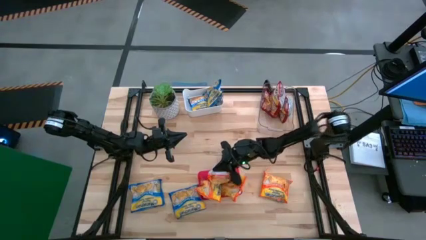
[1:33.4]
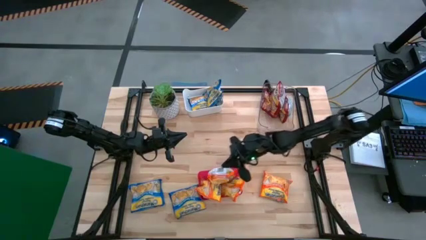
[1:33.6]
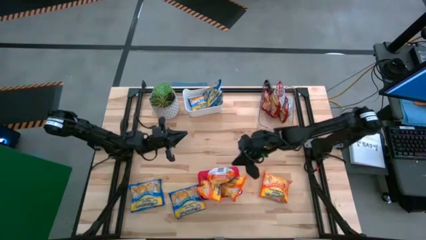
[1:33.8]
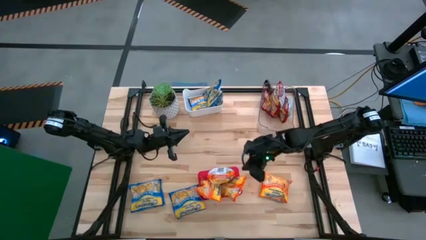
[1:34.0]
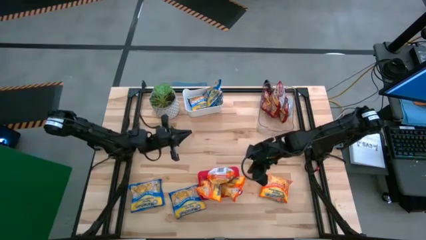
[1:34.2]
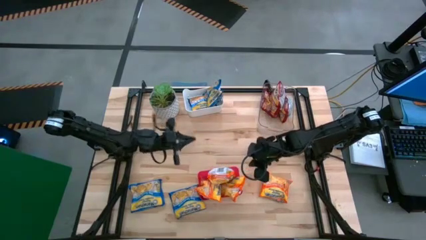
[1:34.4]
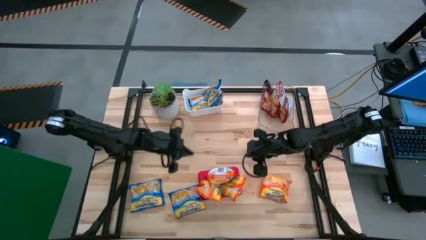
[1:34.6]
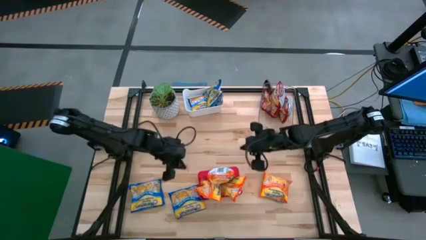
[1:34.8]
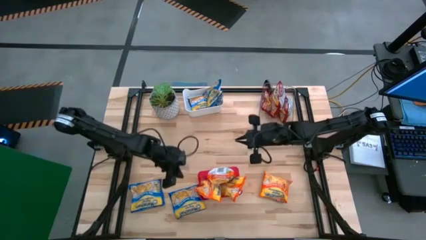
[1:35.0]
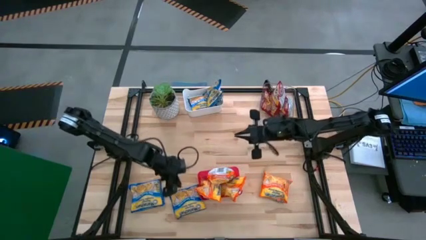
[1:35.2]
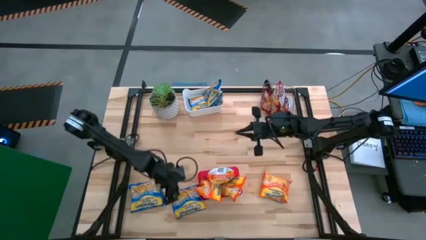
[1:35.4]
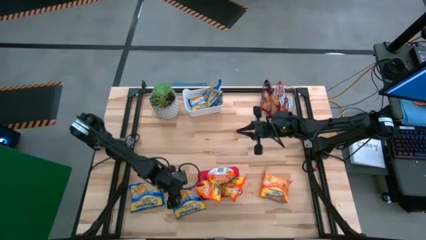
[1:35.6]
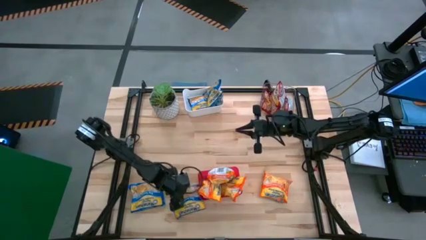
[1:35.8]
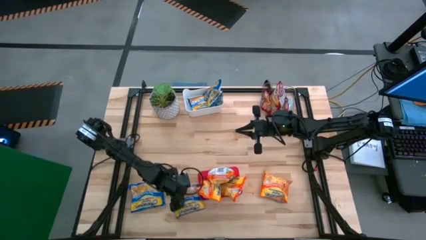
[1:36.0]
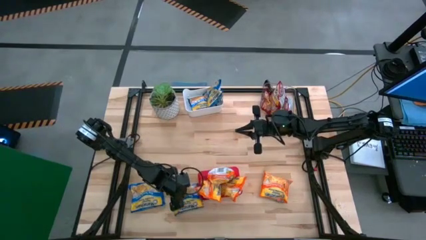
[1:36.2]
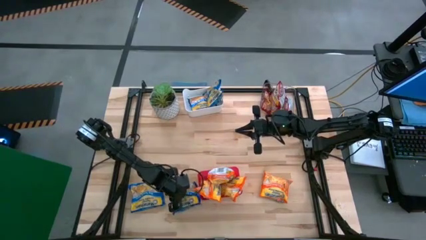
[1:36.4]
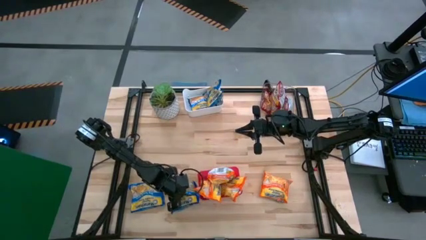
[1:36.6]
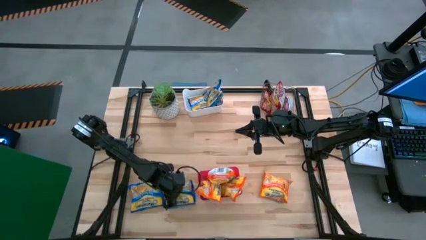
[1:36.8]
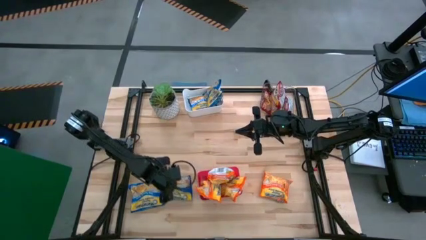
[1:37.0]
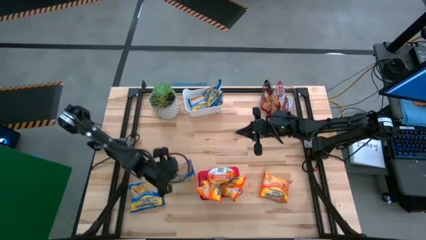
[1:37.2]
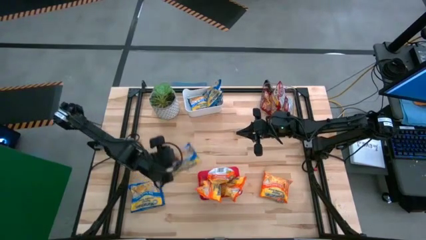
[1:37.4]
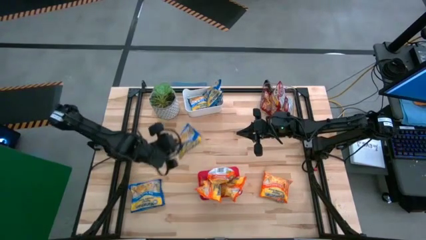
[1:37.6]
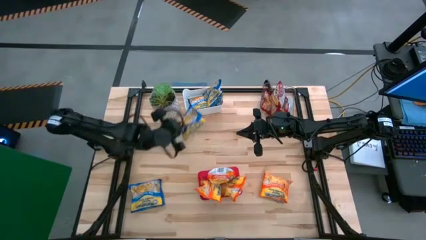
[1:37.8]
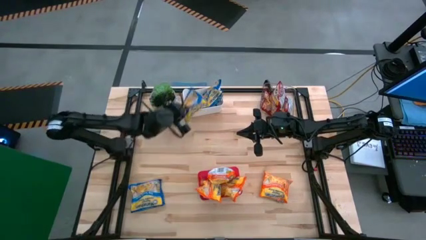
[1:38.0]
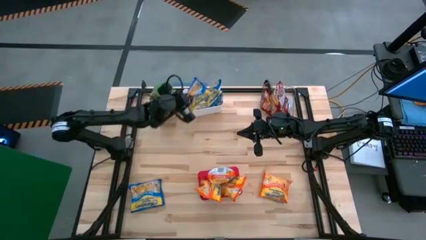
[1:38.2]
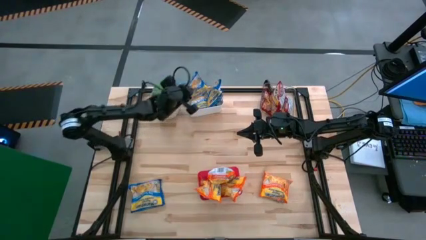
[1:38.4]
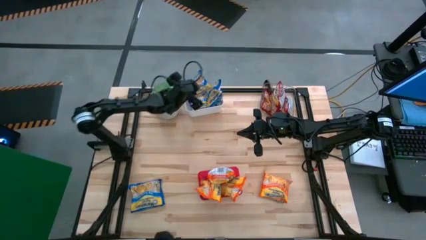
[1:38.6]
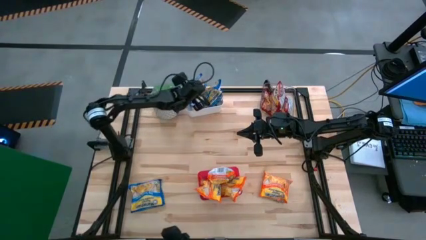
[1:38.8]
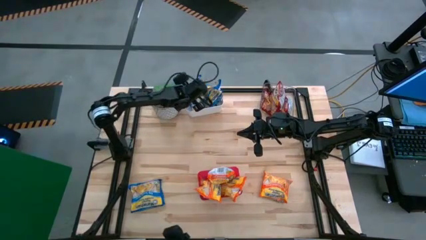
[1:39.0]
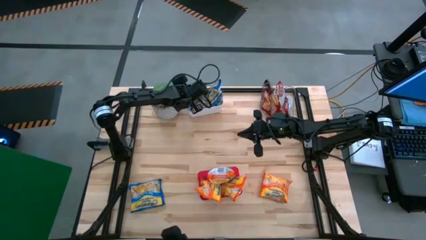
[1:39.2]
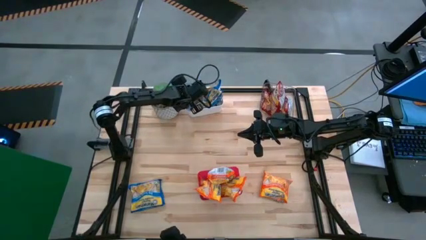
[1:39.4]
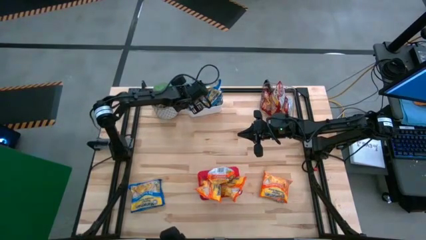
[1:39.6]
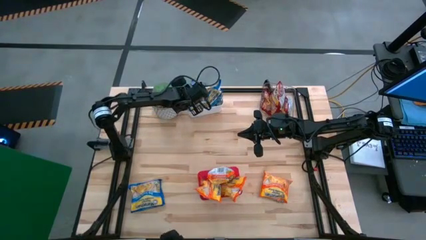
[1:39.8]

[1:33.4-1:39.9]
Task: Sort Maruchan noodles
Put the blue noodle pack into the white bin

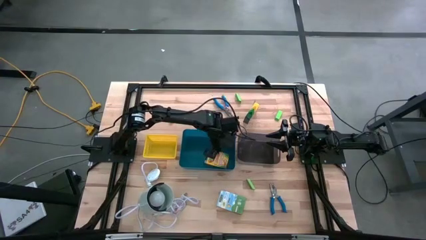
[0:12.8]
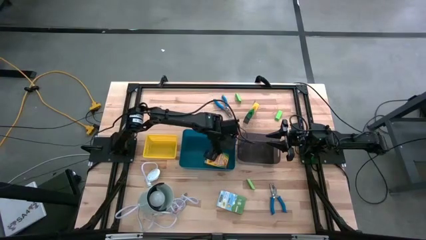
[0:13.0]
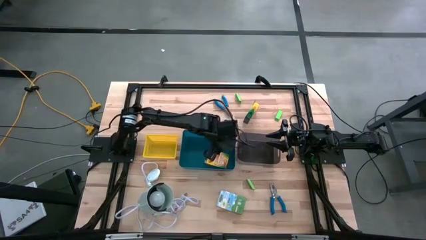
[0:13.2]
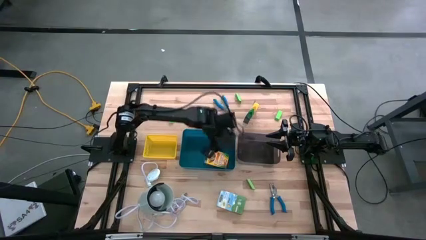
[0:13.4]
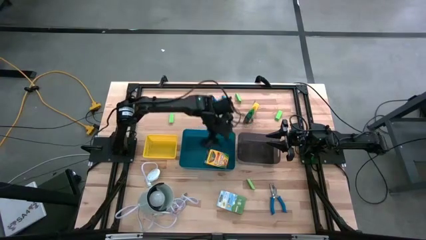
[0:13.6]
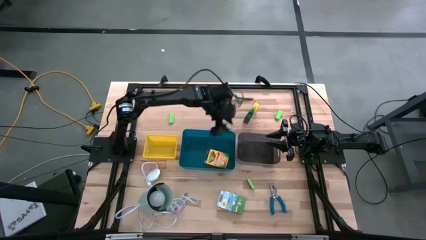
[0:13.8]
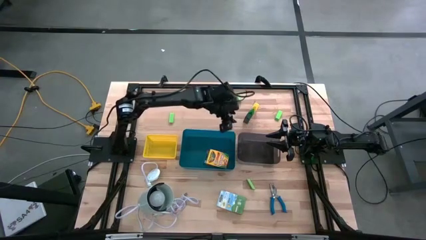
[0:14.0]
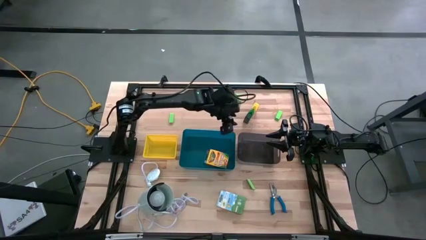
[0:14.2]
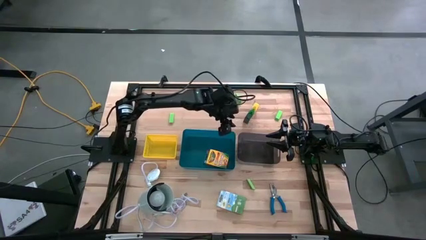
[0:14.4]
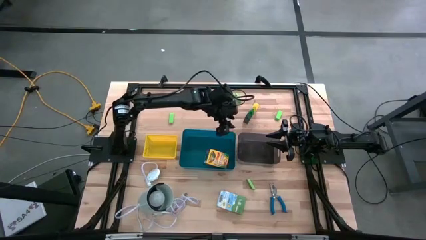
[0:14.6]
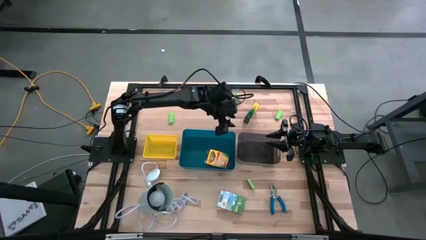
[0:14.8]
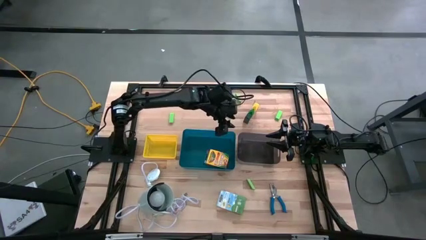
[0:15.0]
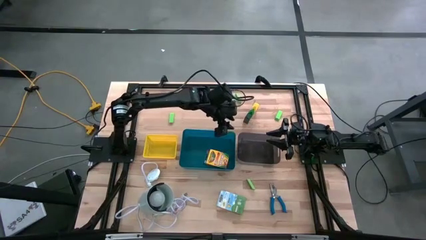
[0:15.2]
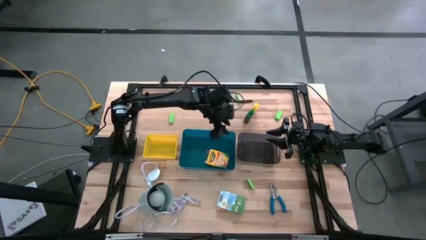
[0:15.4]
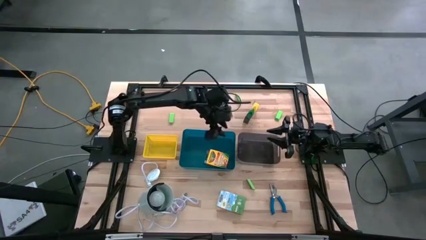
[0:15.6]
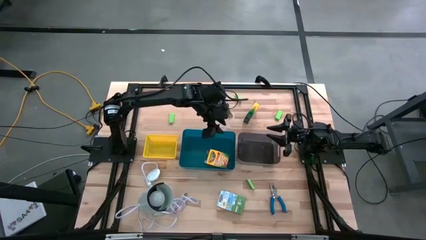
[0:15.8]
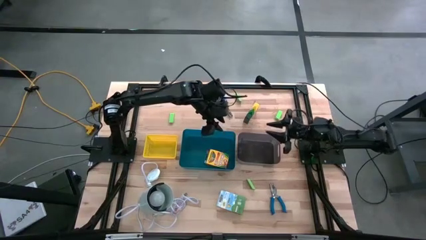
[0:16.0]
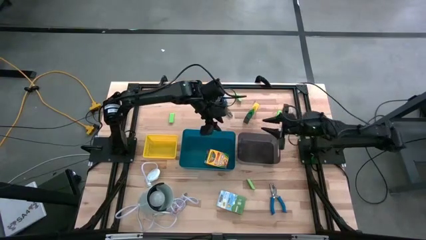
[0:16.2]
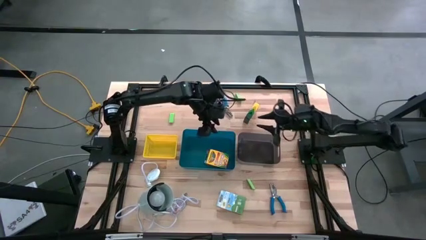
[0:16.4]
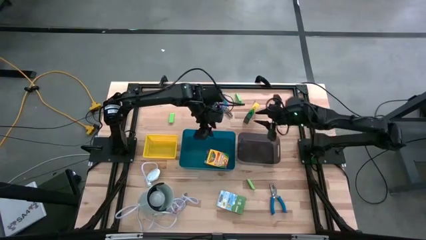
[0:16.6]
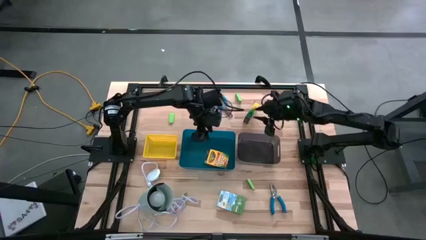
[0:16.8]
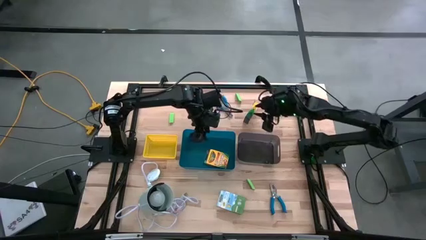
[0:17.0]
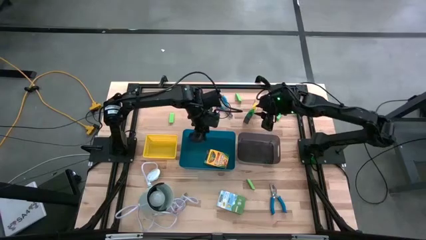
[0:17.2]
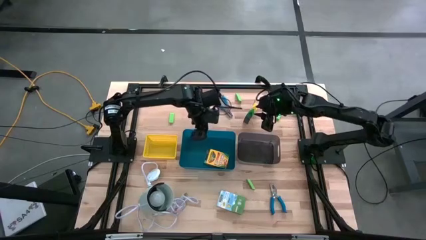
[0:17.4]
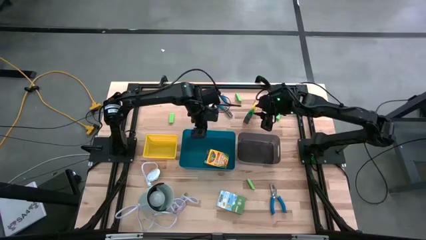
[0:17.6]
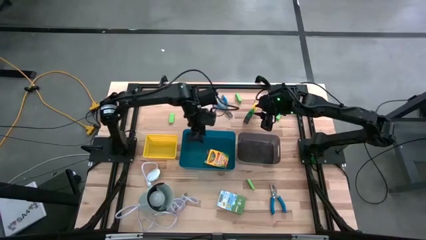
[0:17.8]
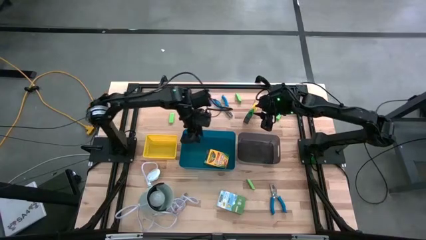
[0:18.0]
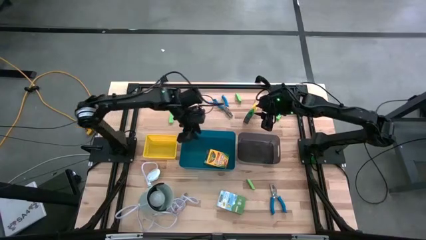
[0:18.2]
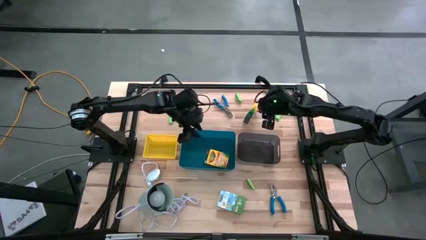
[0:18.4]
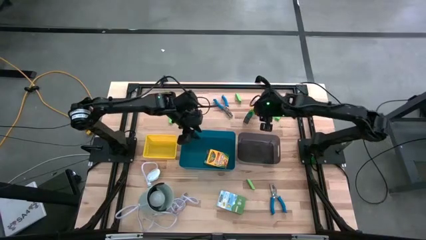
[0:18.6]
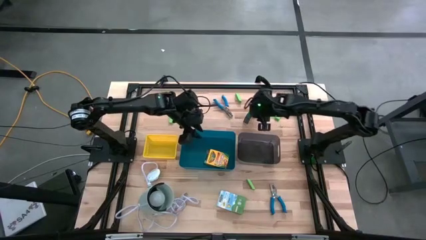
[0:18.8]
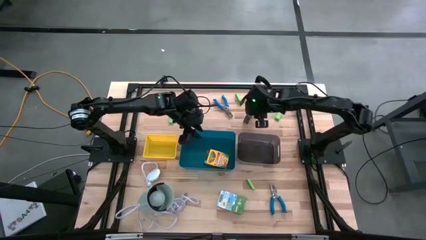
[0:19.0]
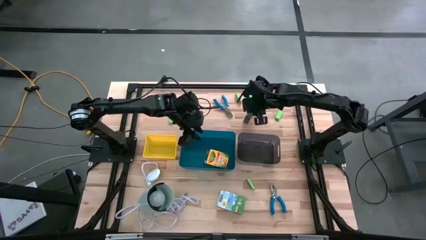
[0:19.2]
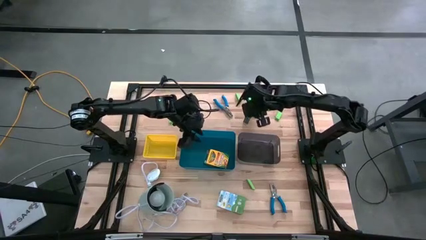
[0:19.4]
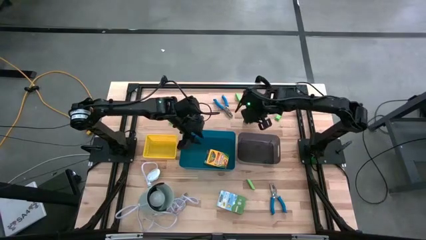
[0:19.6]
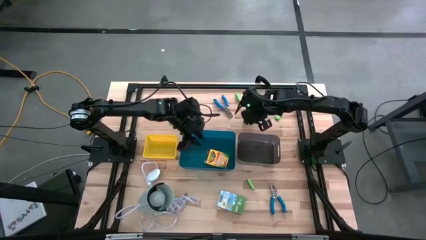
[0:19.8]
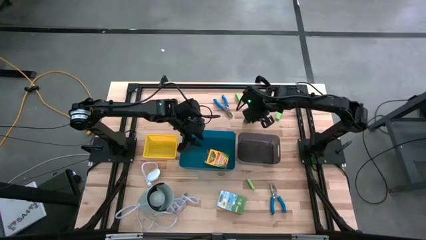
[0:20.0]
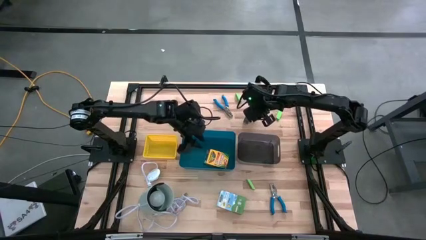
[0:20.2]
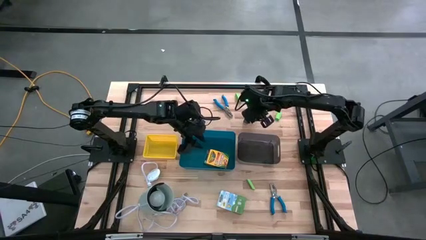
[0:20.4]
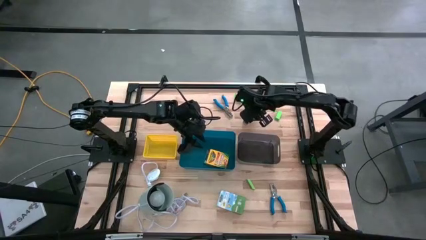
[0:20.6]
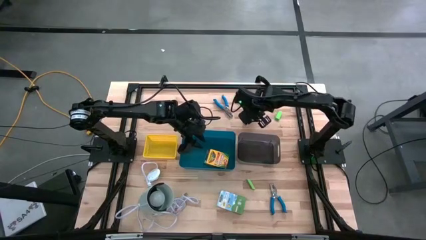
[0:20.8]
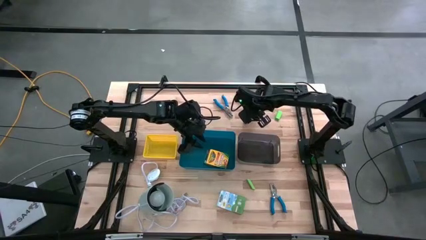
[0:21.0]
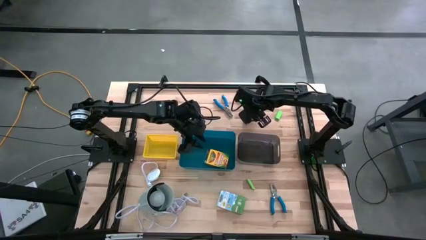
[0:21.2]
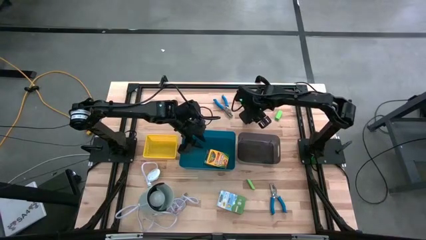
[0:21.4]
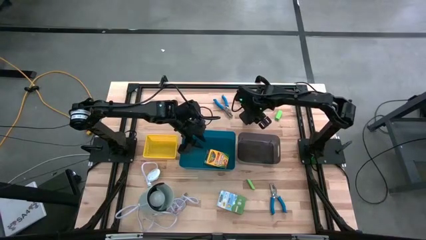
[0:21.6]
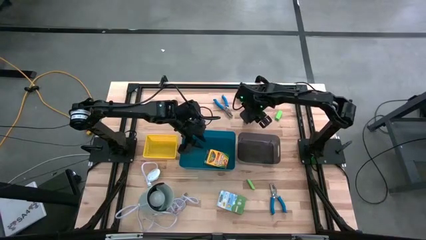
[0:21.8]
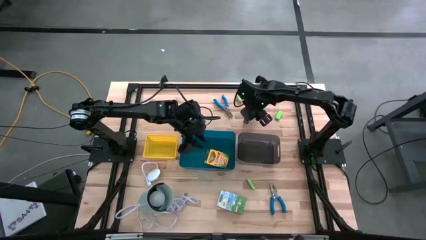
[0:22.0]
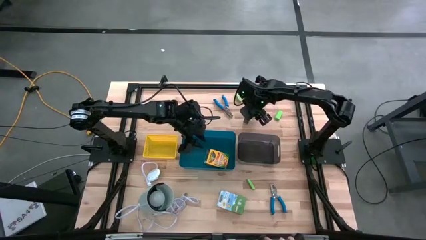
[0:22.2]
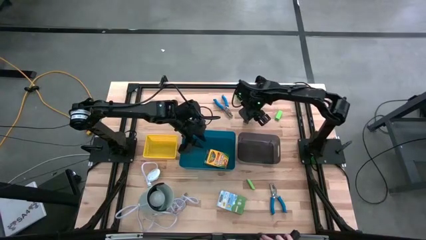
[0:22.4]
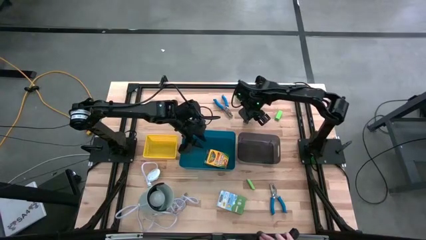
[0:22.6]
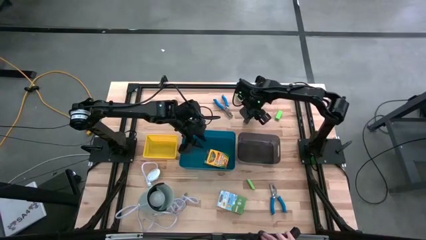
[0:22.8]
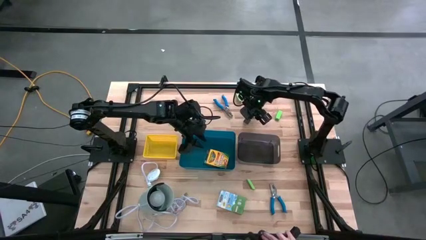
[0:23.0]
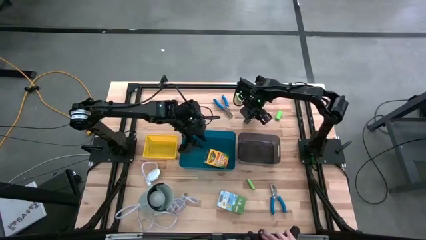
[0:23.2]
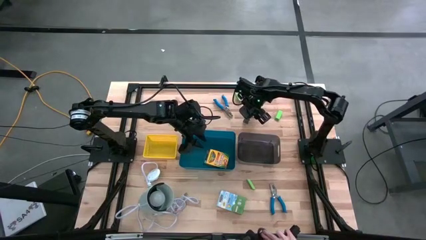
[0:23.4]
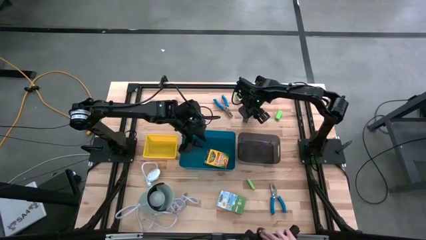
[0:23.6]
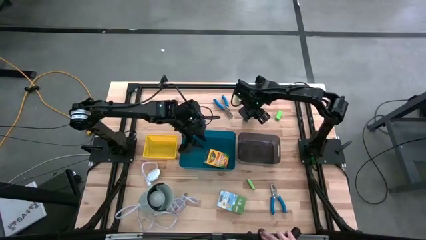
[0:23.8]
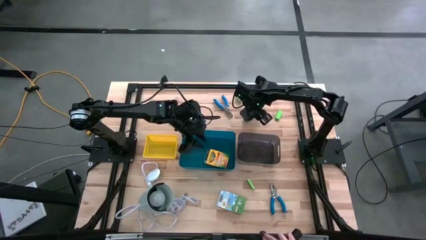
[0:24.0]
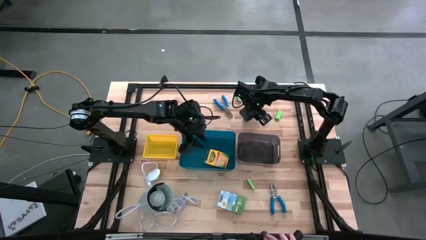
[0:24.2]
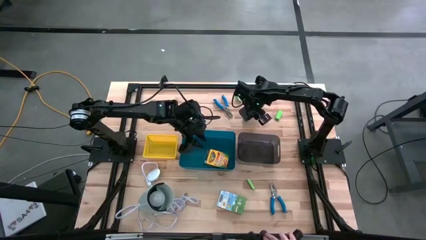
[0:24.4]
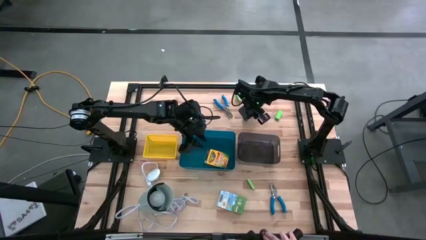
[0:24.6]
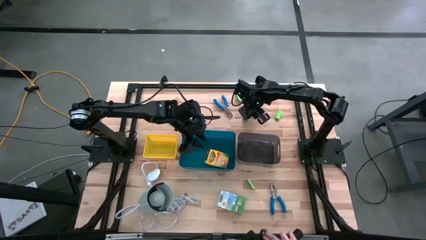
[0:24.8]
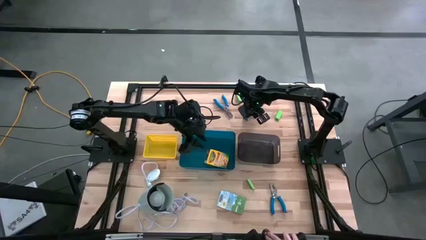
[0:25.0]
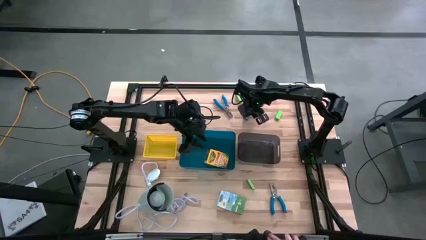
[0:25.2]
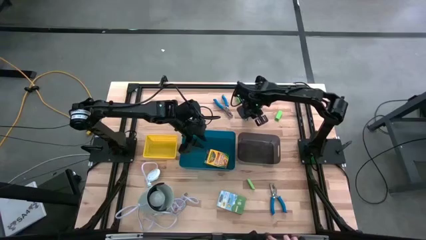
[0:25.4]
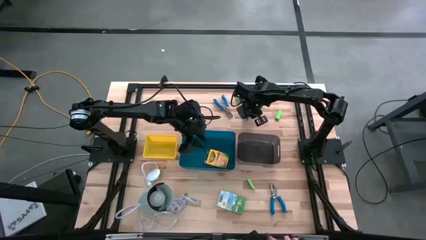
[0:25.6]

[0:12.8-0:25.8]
Task: Pick & Place School Supplies
Put the yellow box of crayons into the blue bin
